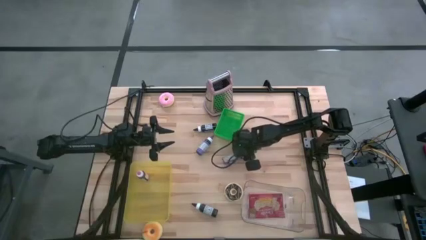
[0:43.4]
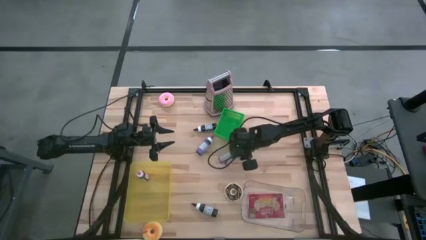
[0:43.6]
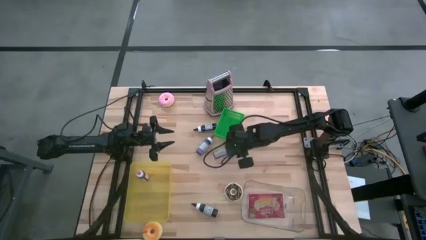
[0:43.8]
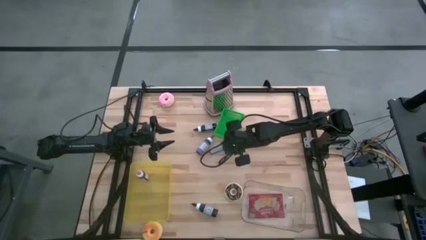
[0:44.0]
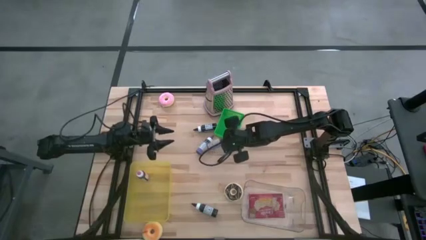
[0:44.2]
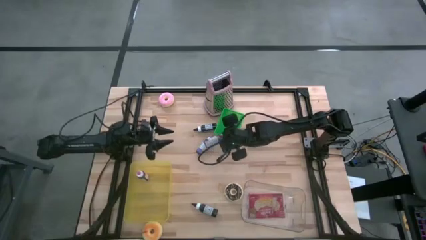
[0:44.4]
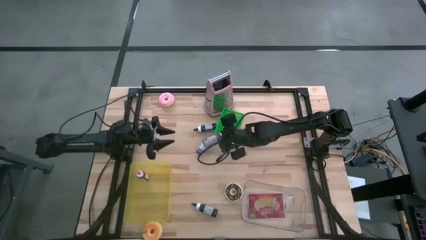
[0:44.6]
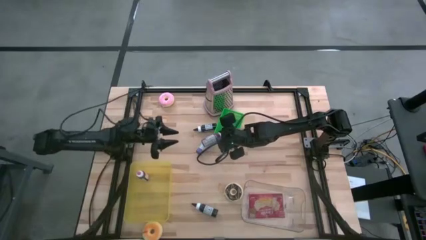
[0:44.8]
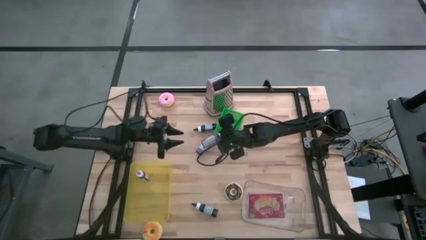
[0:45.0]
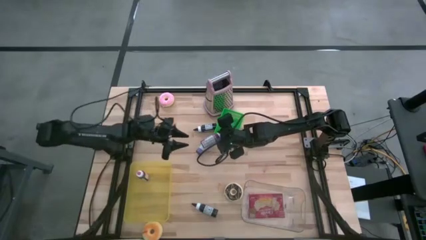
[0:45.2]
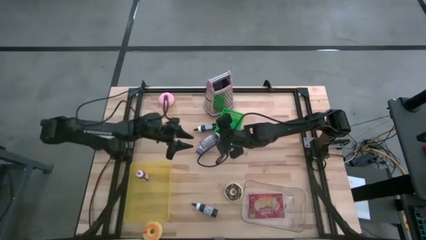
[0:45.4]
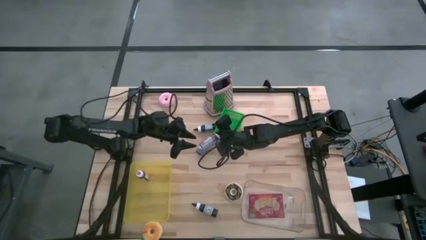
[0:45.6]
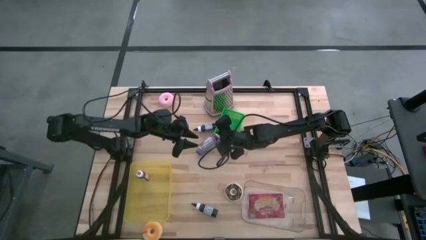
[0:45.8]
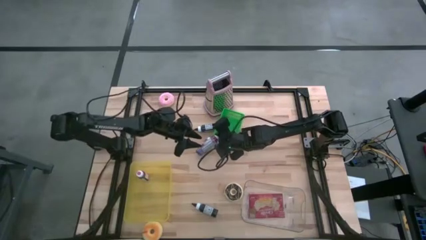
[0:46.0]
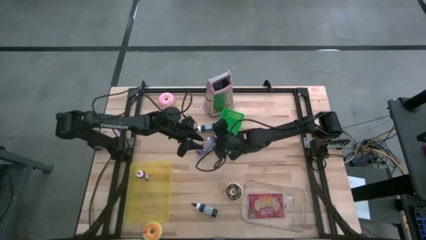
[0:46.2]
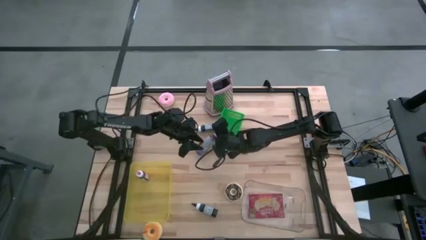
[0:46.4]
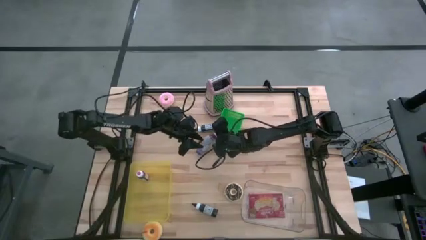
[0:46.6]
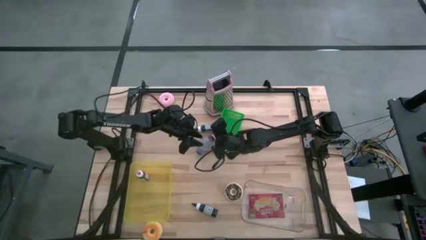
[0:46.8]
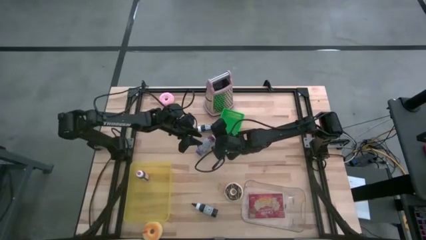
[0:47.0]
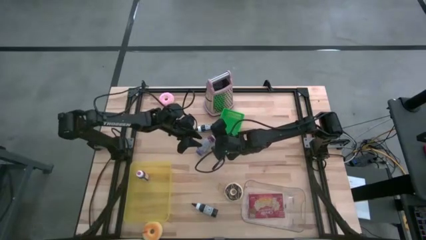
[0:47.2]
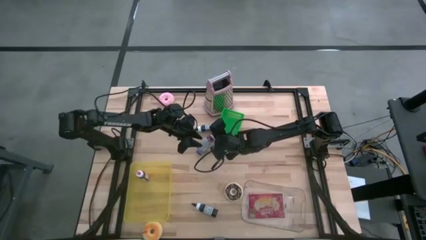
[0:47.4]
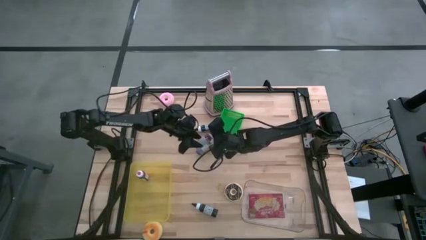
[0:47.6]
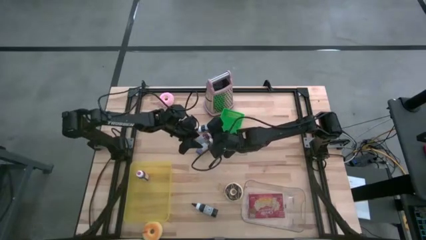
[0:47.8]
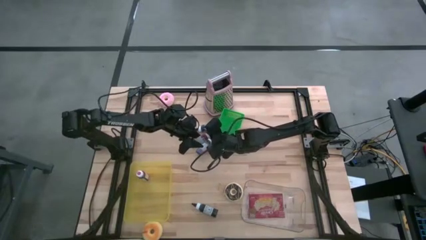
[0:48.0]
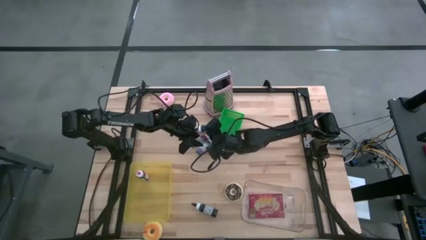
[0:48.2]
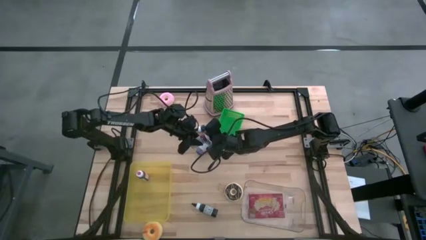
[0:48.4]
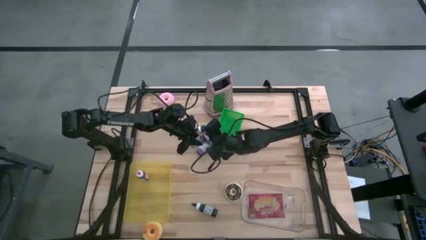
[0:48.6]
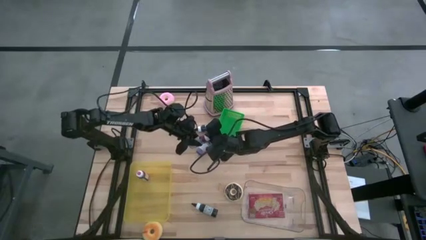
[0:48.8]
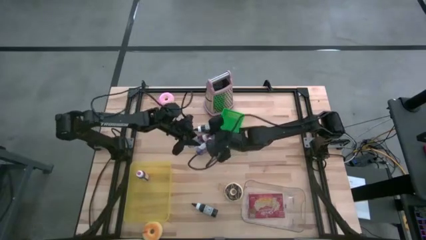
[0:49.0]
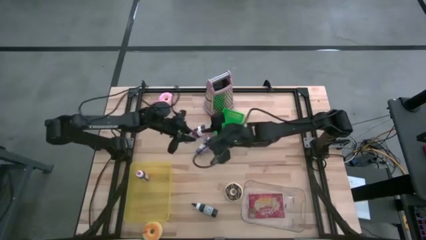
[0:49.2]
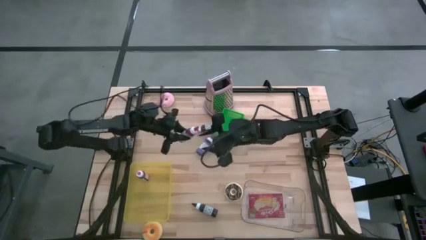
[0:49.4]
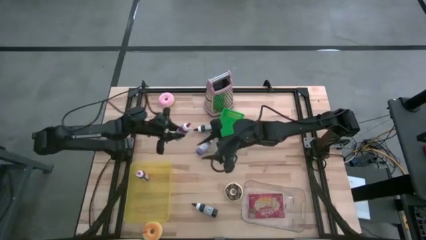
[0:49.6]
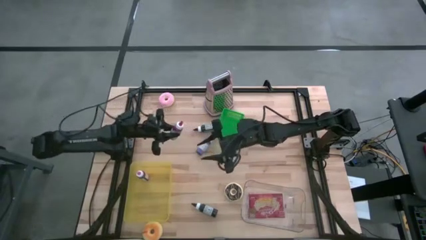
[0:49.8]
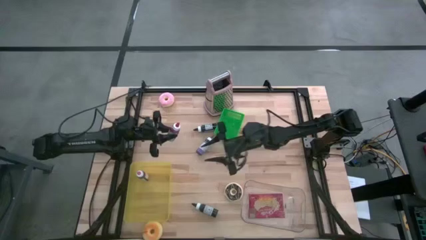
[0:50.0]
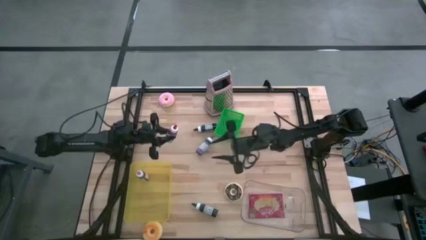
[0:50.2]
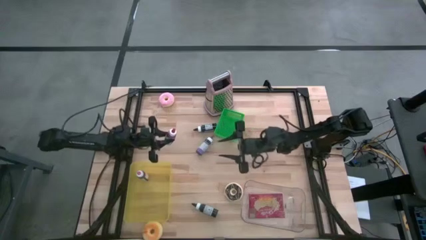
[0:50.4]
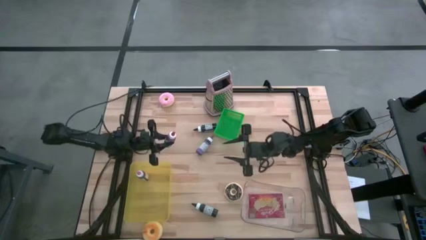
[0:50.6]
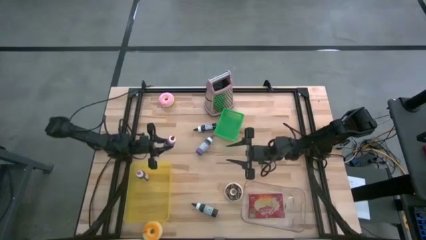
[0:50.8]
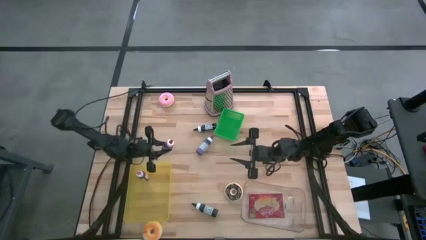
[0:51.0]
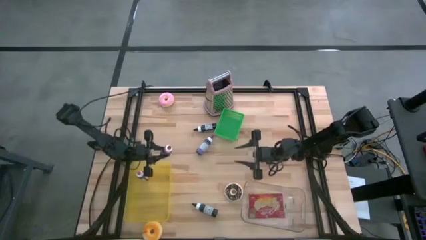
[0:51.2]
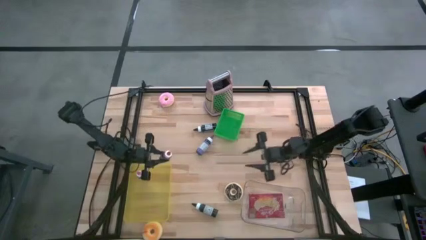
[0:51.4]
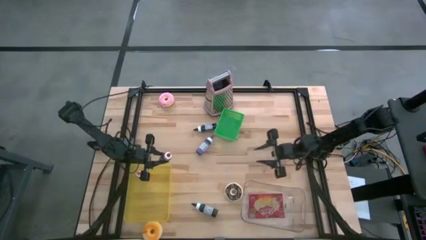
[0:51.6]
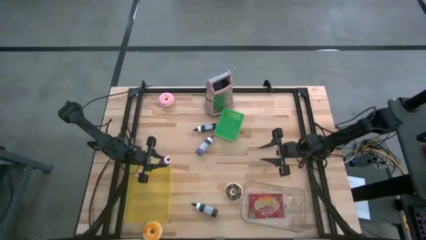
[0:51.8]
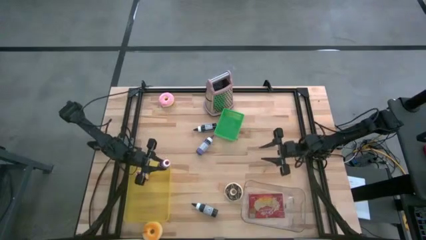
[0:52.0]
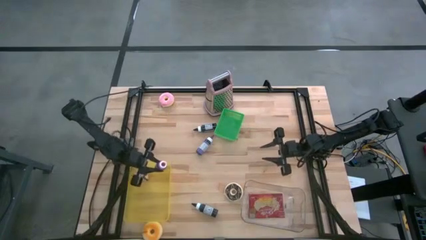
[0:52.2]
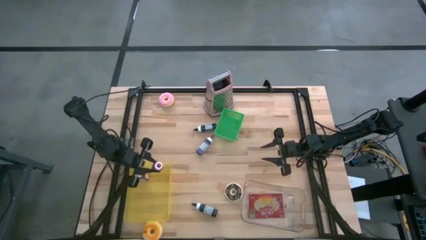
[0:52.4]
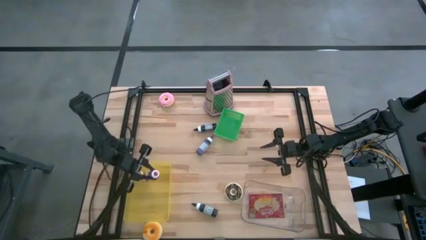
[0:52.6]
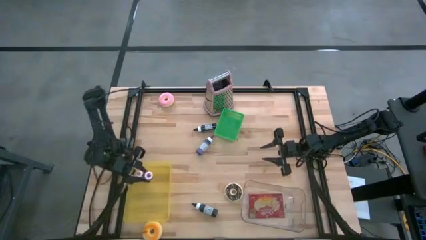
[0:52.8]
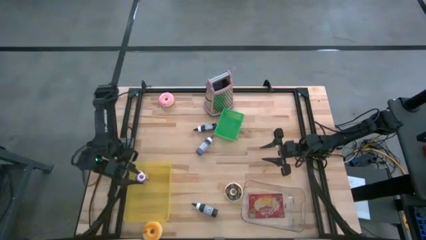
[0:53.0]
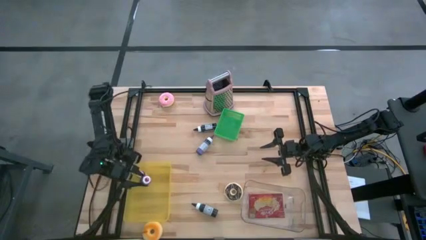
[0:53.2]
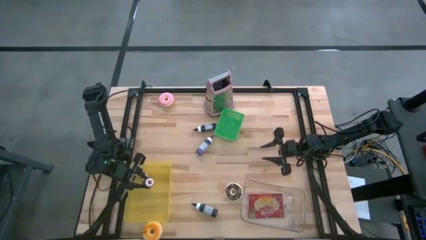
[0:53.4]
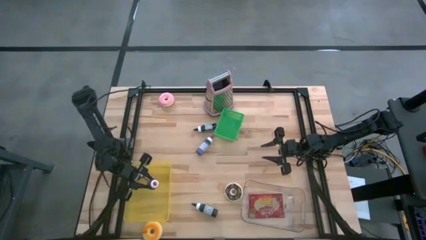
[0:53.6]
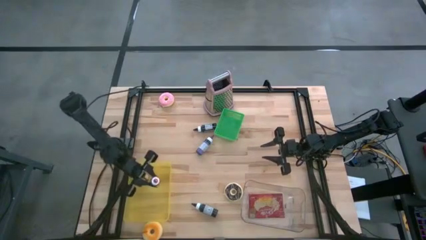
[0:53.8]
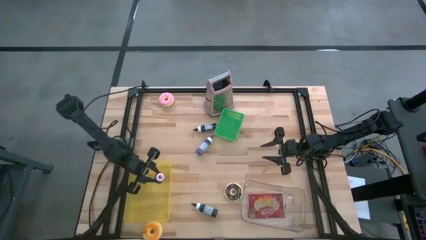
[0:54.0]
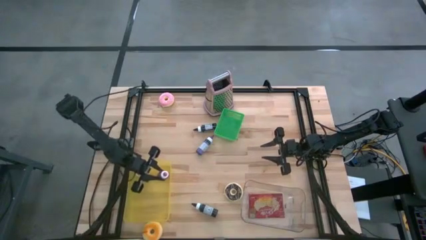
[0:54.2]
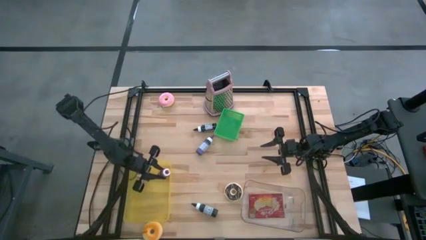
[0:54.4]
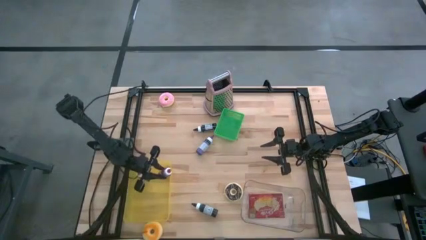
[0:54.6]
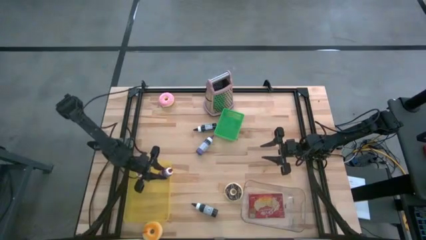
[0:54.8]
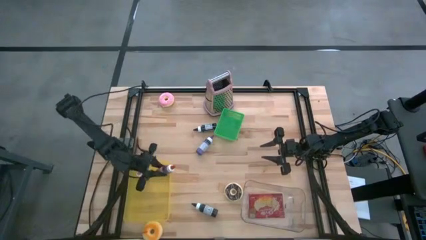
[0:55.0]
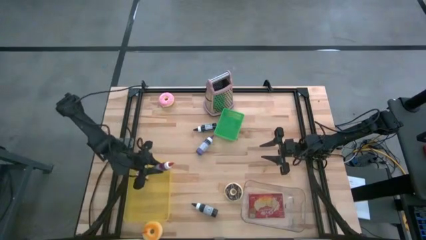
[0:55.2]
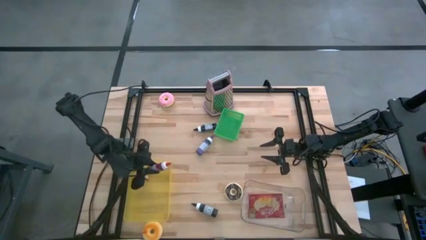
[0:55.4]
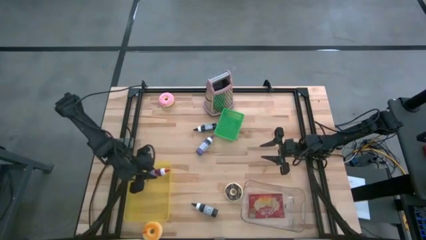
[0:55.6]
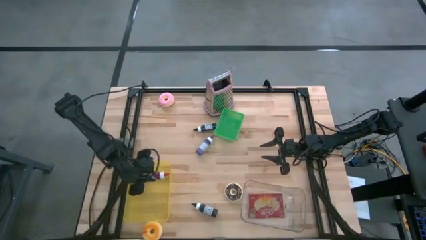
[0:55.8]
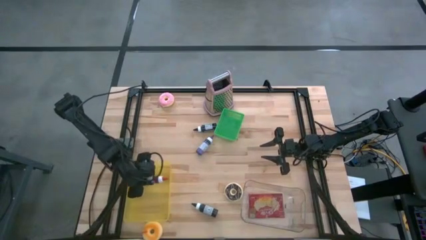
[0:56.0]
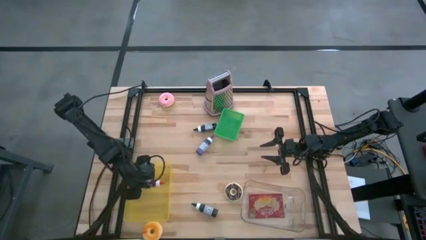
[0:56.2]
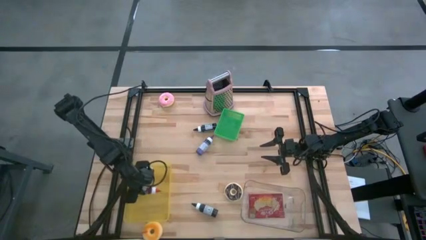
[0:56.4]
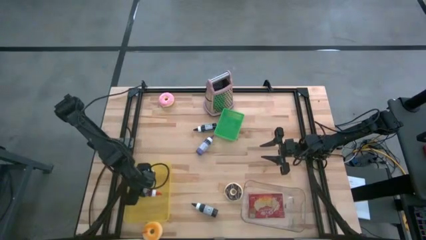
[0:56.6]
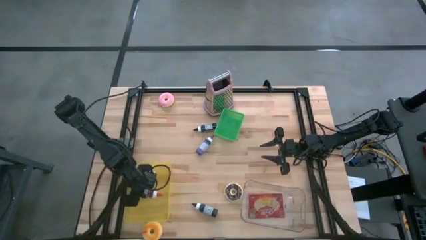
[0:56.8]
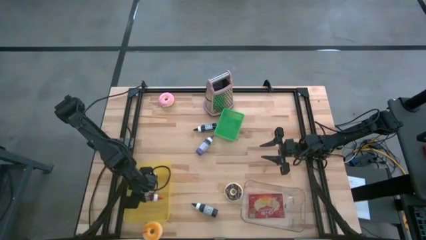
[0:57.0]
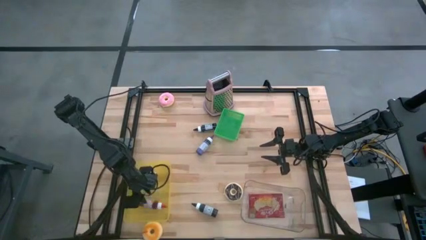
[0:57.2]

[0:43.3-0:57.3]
Task: Pick & Place Food Item
Put the red ink bottle into the yellow bin

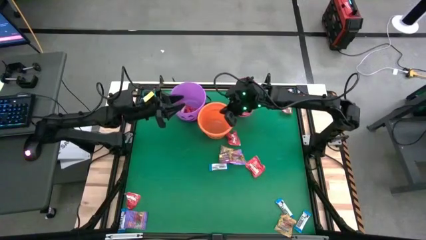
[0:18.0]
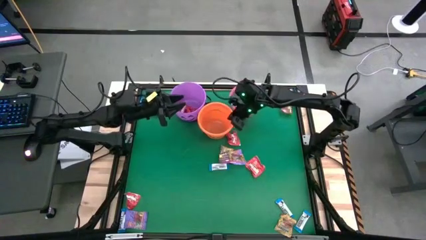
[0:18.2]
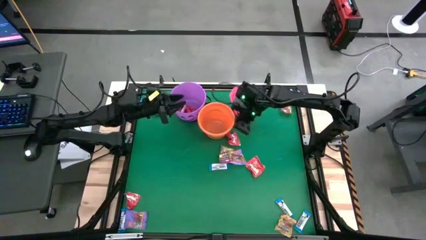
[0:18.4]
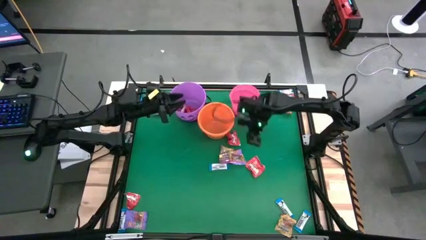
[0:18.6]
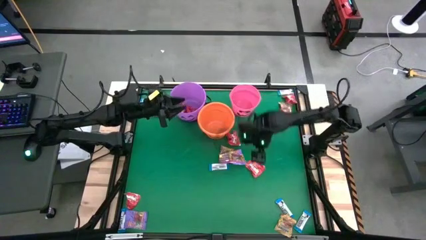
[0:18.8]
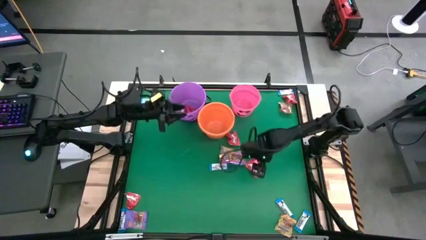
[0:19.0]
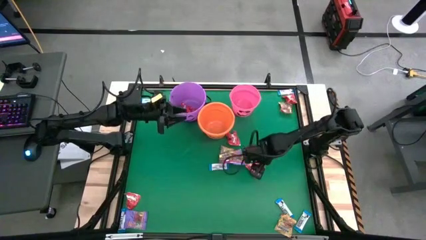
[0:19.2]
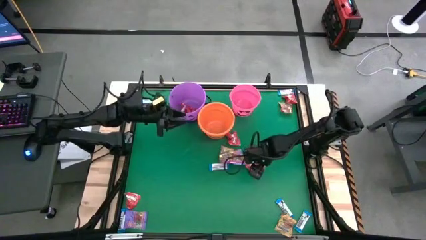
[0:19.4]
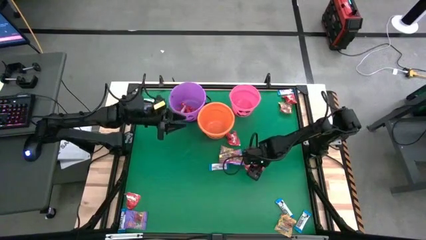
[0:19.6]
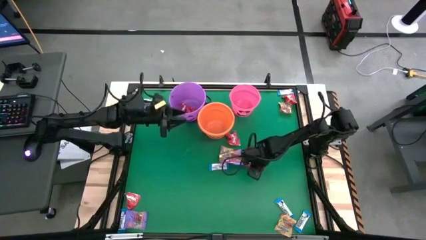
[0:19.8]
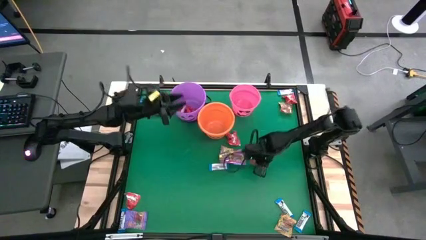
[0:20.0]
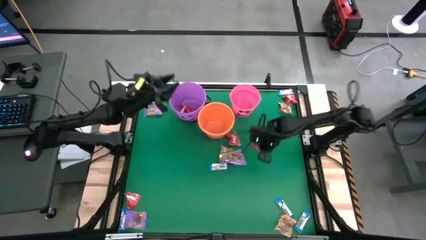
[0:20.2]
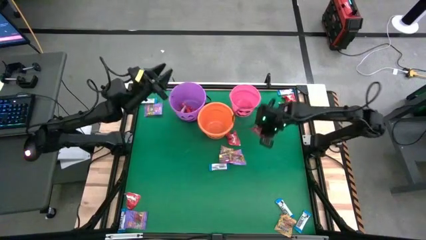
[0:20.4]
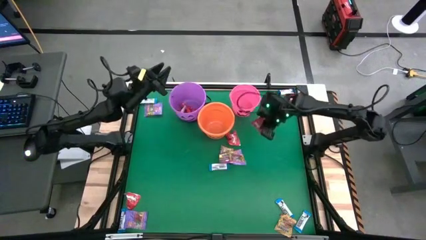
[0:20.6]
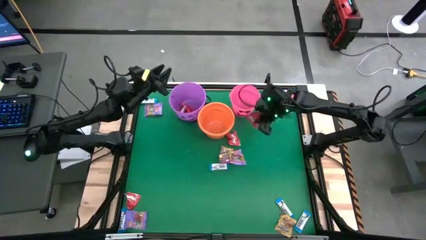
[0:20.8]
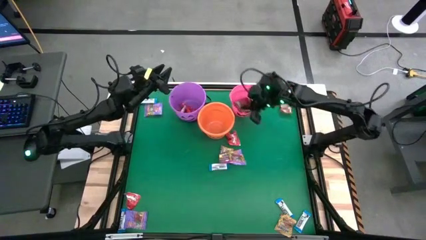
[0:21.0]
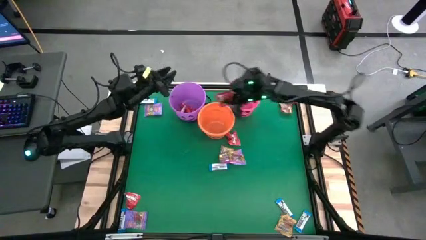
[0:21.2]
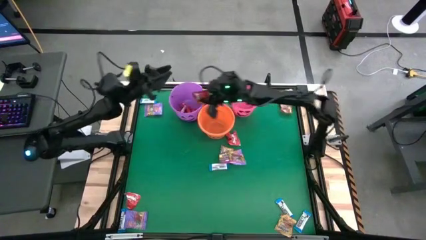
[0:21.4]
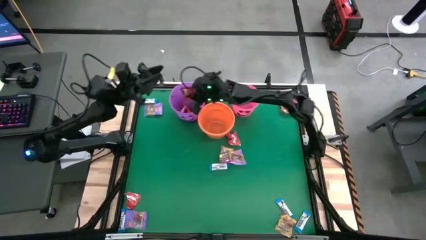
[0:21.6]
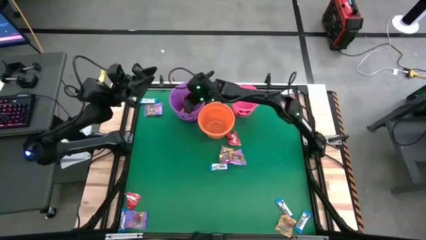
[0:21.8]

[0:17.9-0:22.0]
Task: Sort candy by brand, put in halloween buckets
Put the red candy into the purple bucket
